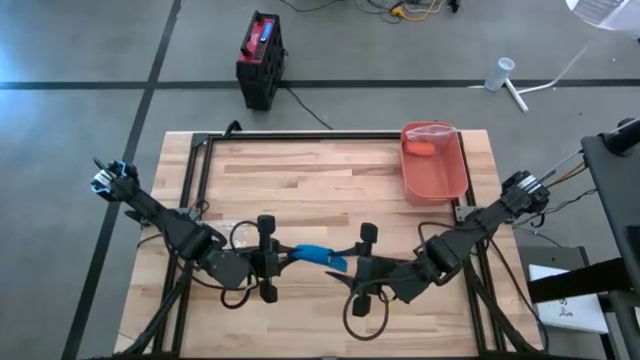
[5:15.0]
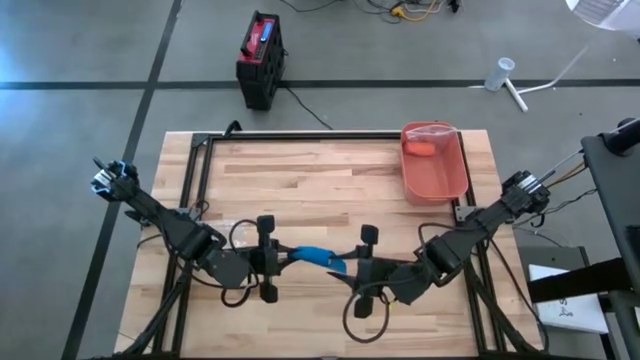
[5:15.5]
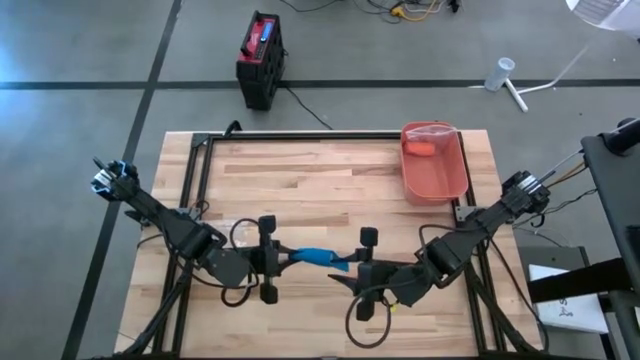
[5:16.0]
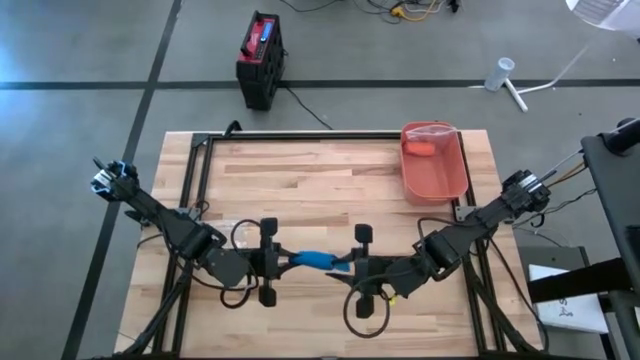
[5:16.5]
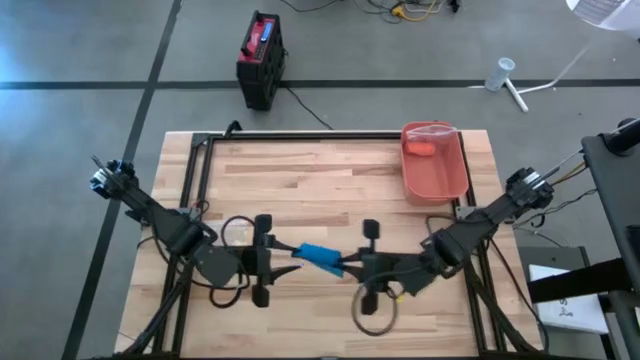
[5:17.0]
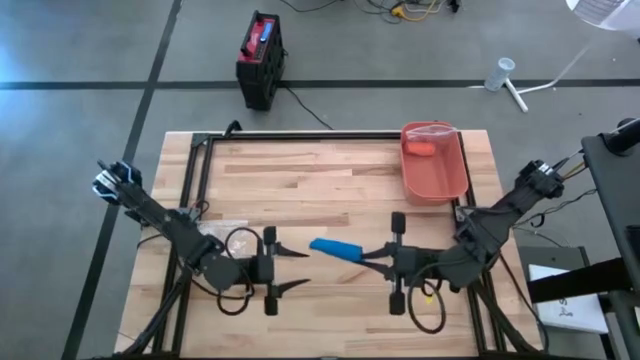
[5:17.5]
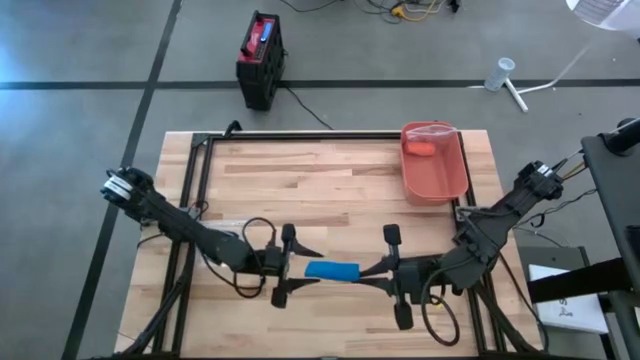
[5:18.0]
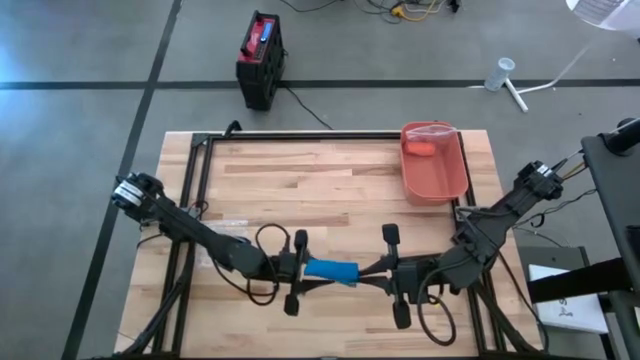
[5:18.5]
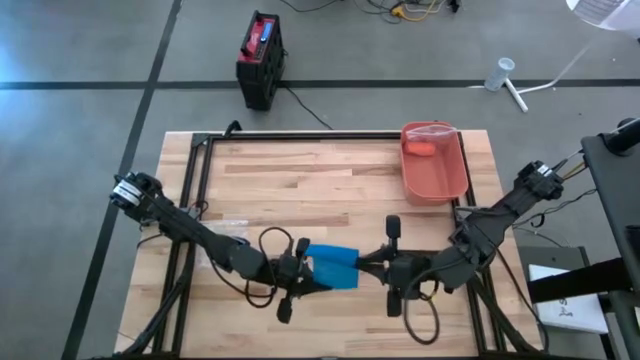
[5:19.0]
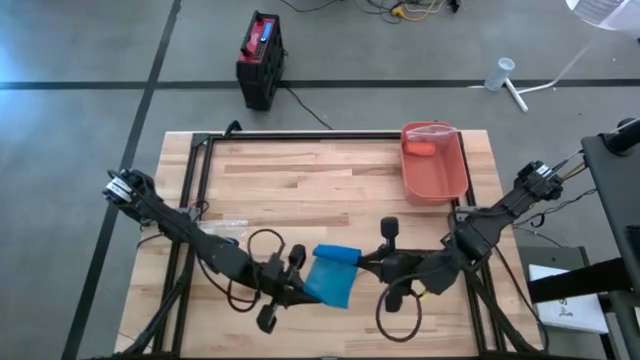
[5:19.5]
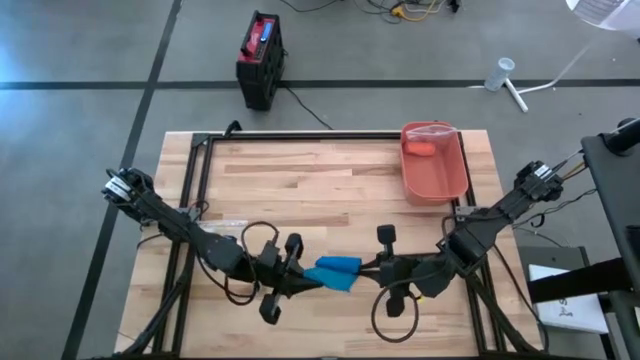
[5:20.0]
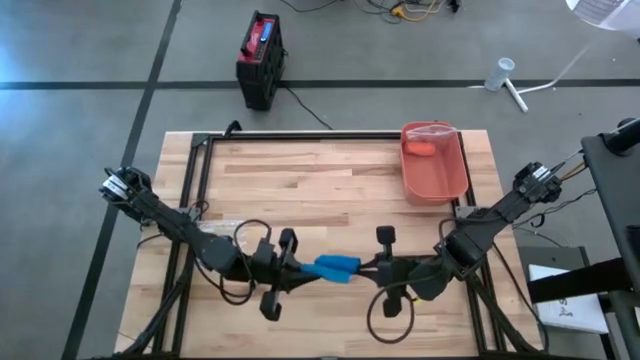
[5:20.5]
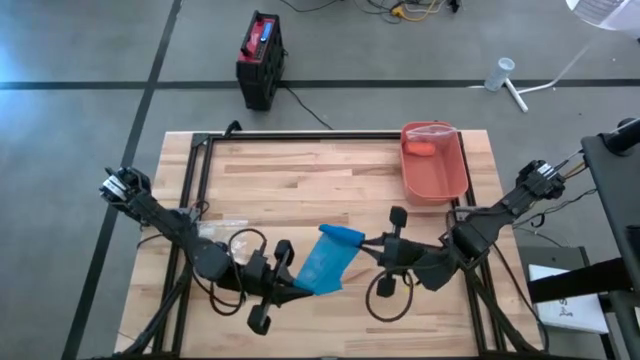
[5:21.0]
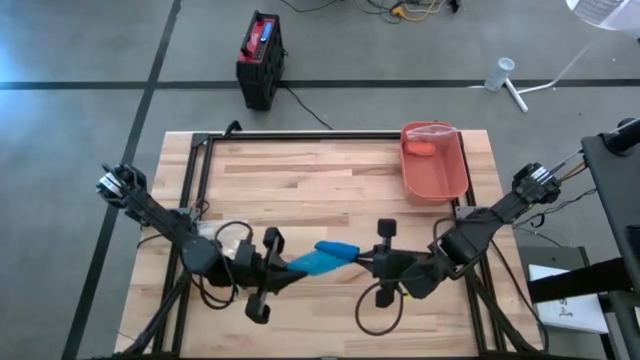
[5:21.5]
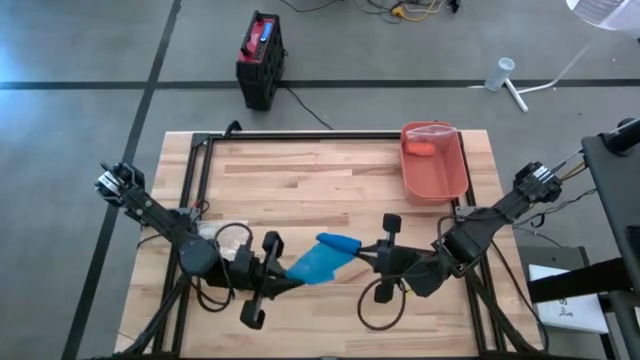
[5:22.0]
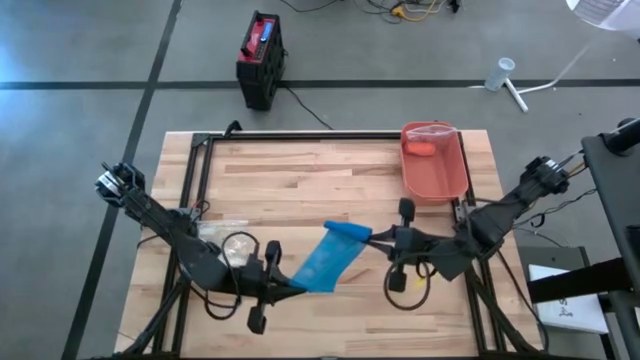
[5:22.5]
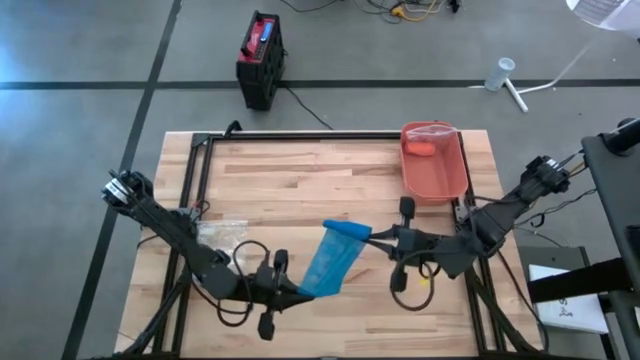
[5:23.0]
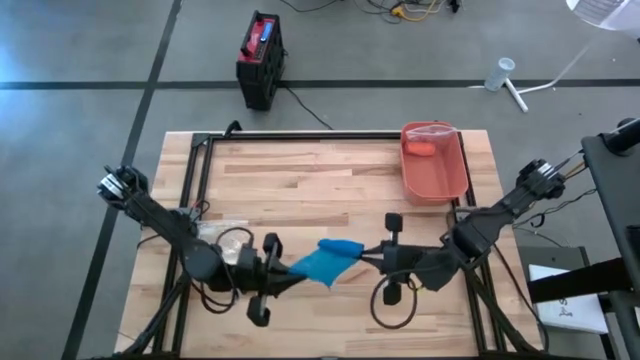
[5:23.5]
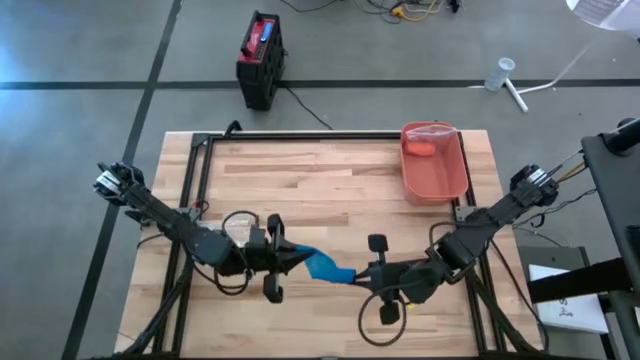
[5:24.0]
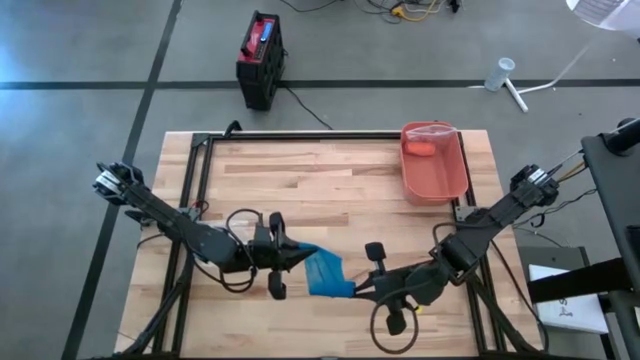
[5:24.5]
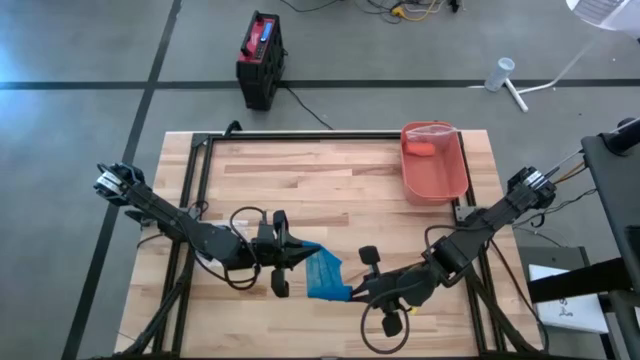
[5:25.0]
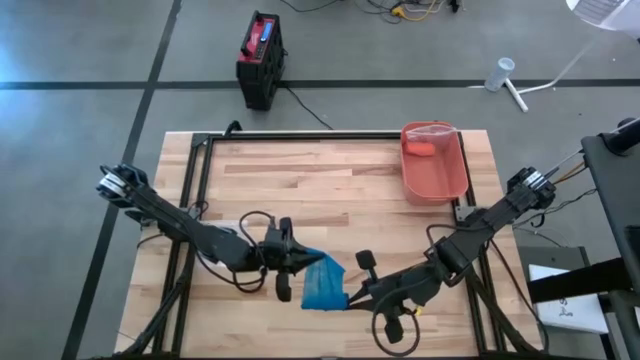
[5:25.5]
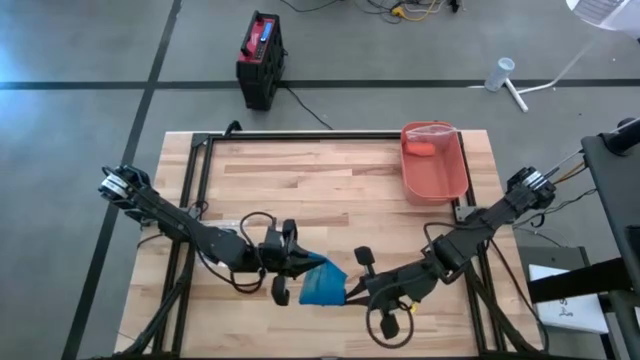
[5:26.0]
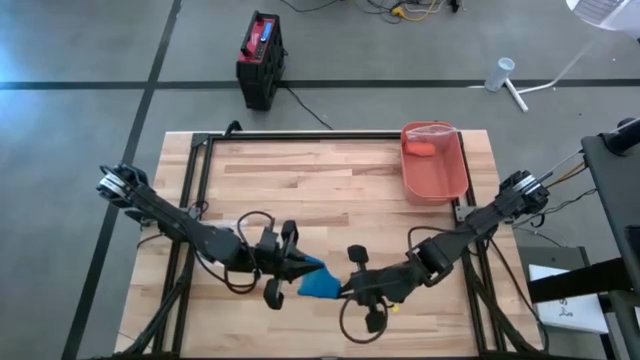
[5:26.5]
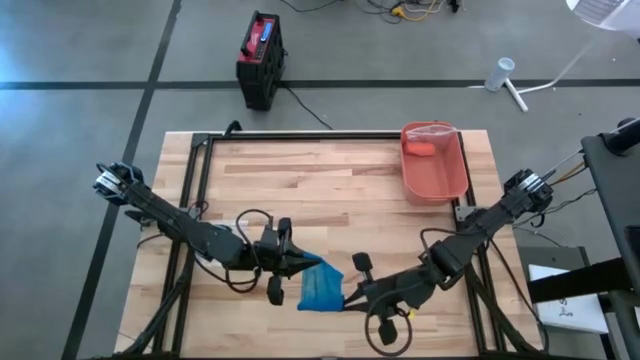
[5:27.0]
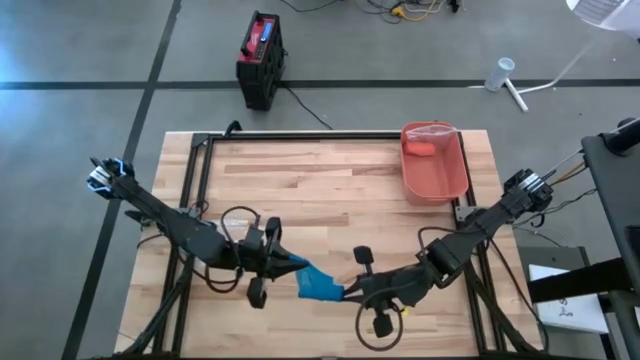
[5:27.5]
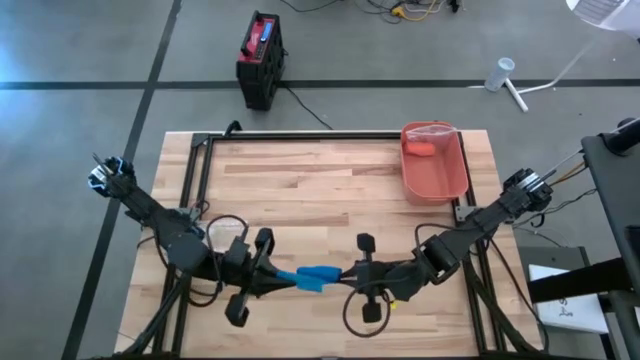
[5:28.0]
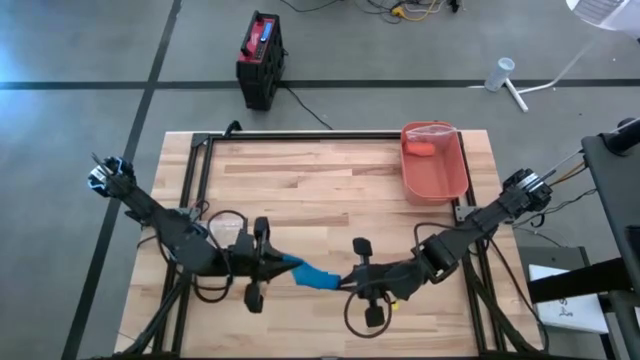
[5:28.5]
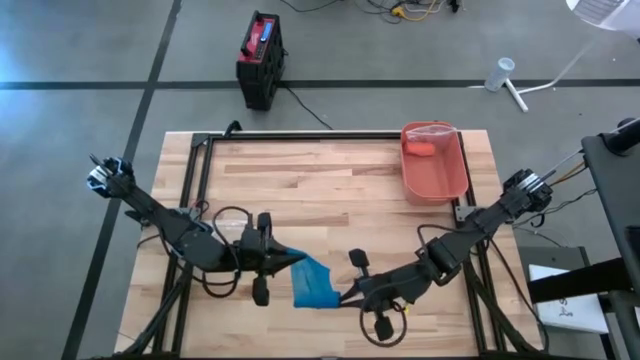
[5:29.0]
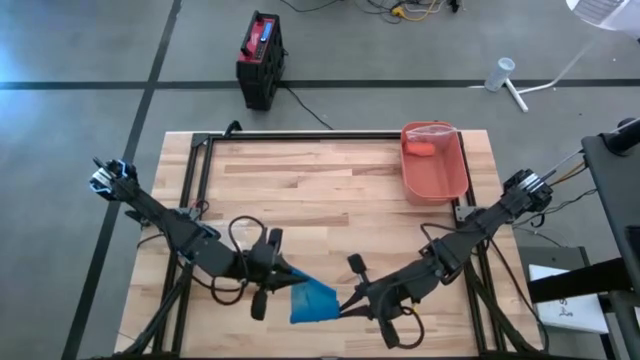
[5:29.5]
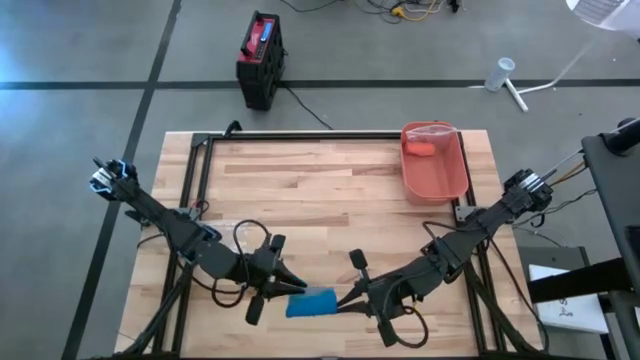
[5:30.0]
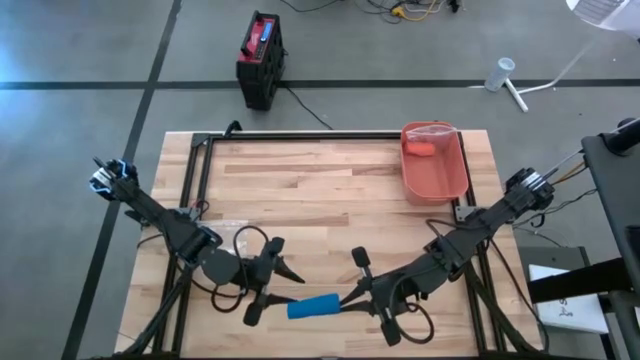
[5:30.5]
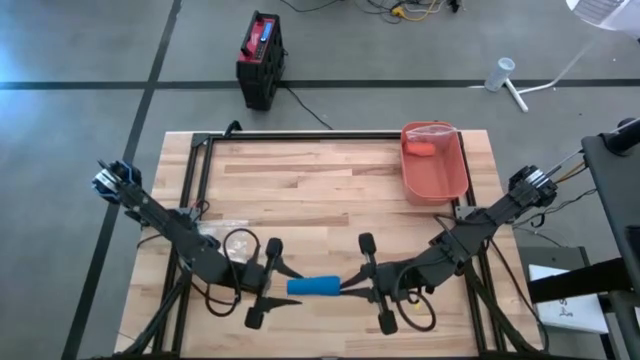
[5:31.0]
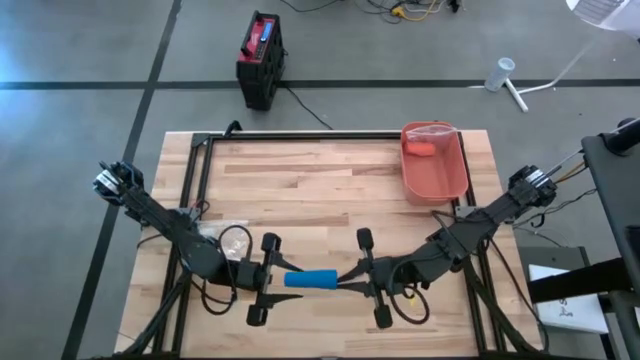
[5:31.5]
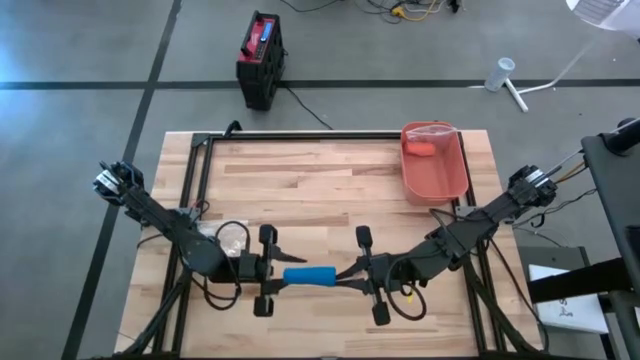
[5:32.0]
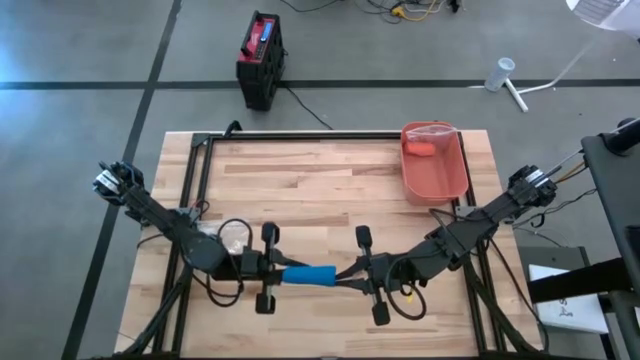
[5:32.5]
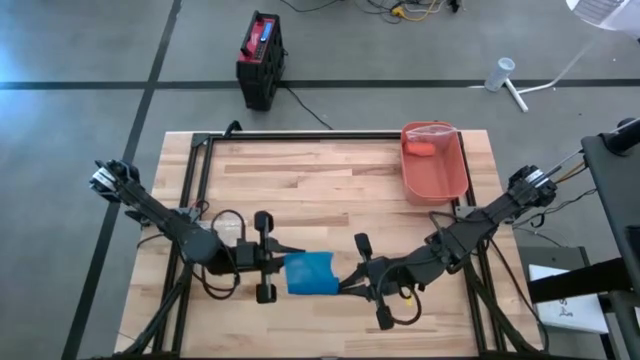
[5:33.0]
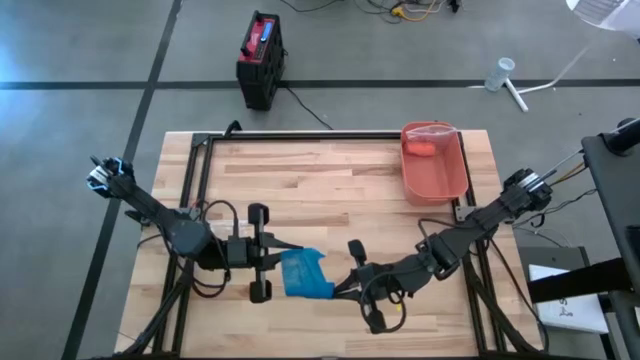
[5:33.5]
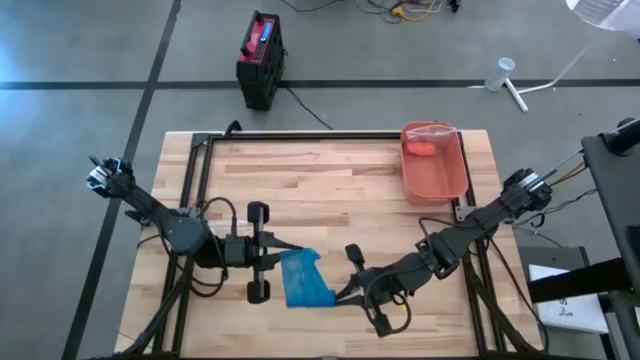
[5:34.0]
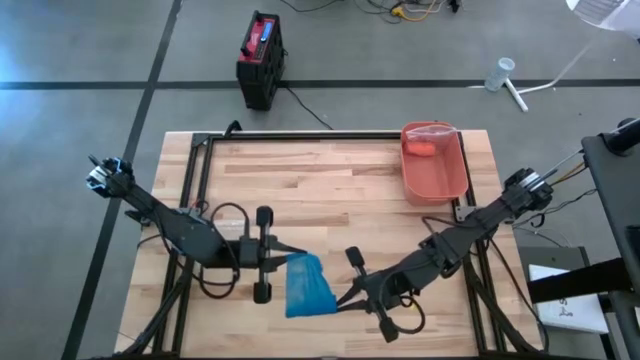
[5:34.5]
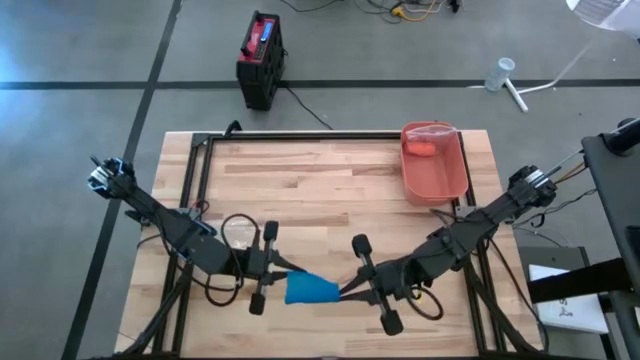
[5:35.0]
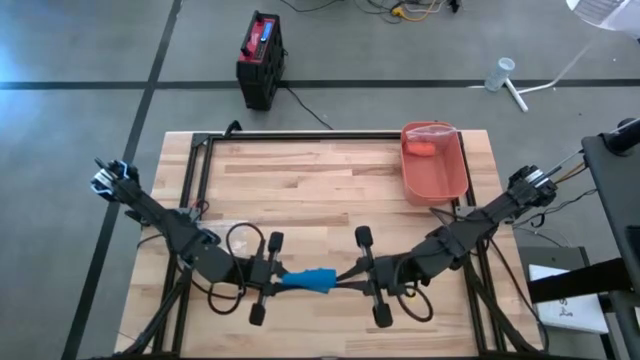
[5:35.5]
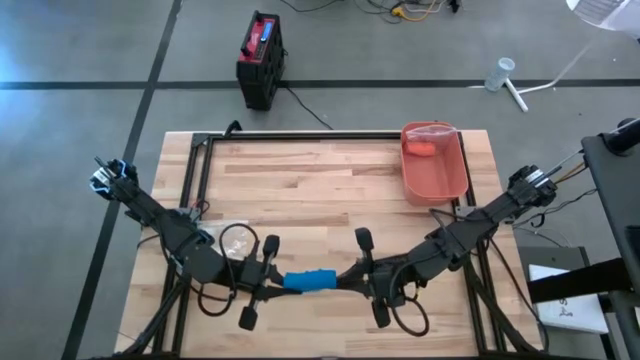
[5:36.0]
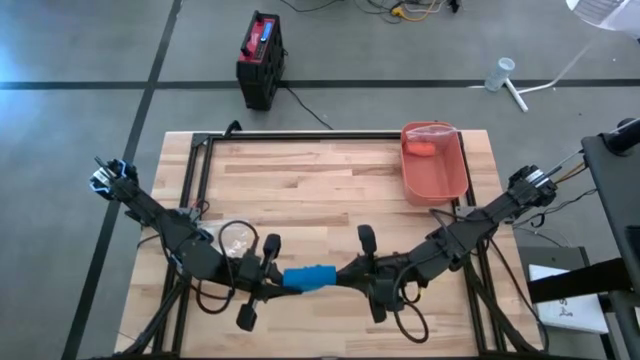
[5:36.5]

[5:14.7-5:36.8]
Task: Roll bandage
Roll the blue bandage
